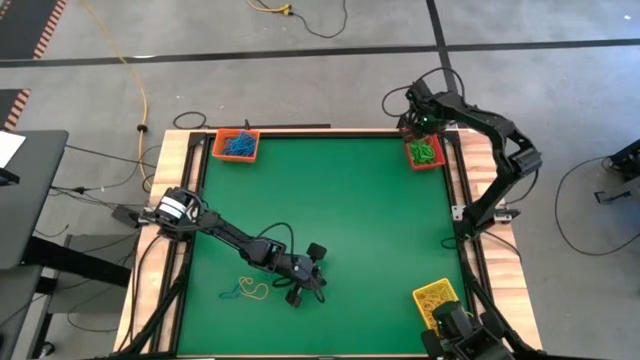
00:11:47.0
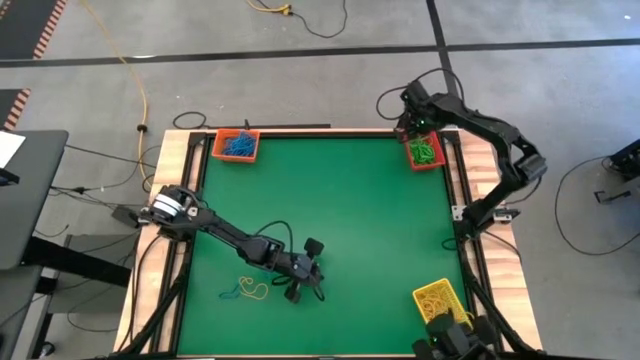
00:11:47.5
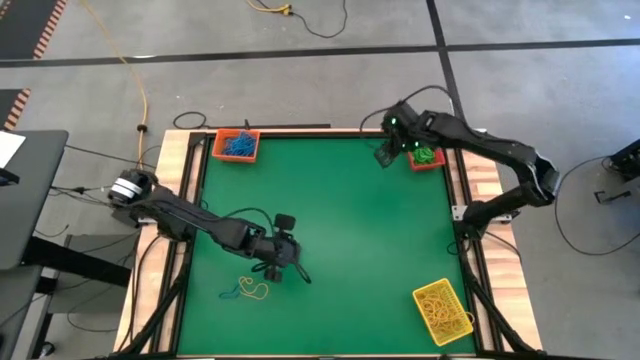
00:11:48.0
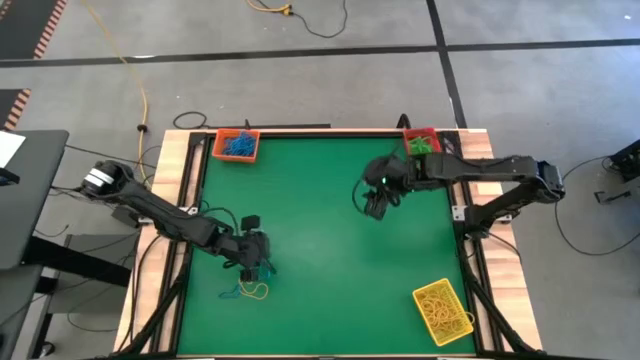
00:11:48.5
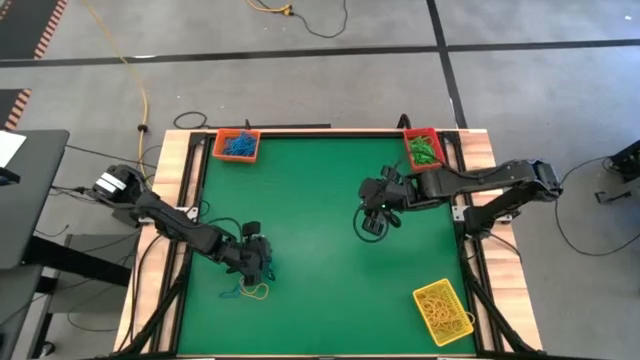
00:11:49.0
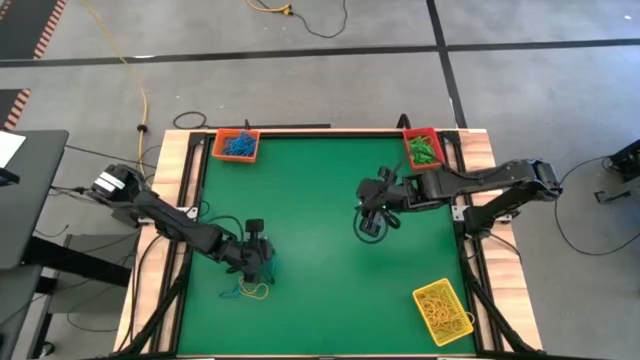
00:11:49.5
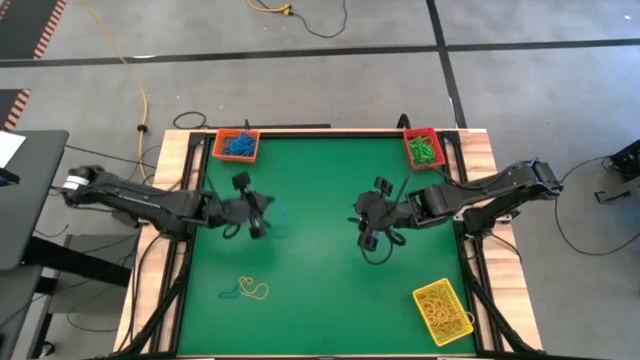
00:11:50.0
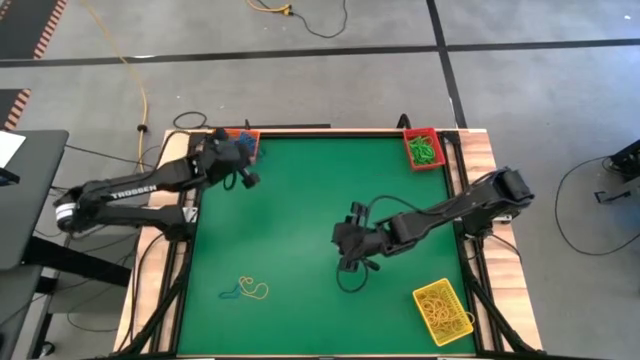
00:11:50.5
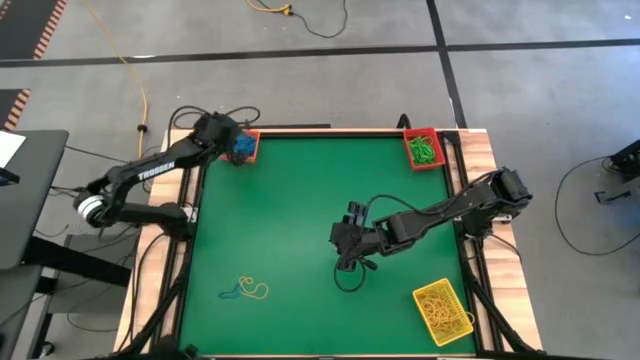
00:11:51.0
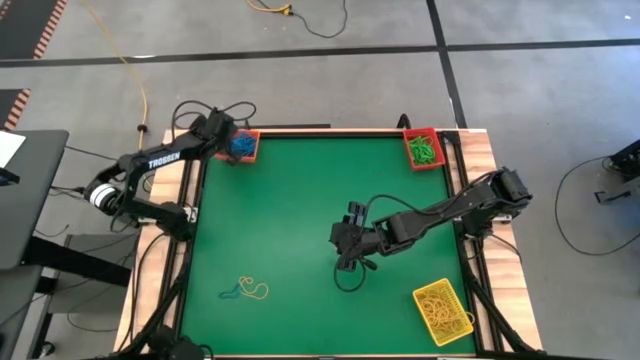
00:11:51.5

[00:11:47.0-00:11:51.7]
Task: Sort rubber bands into baskets
Put the left blue rubber band into the orange bin

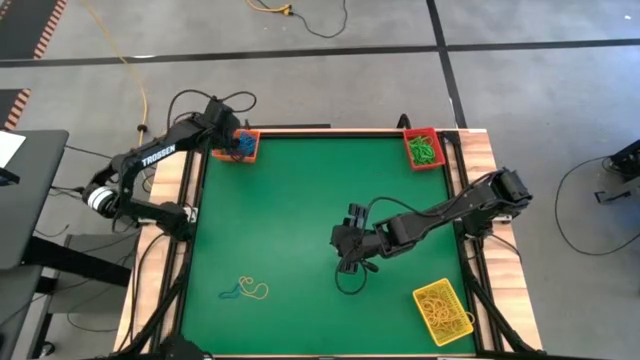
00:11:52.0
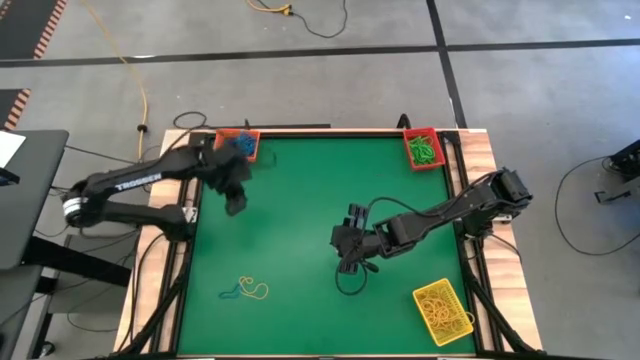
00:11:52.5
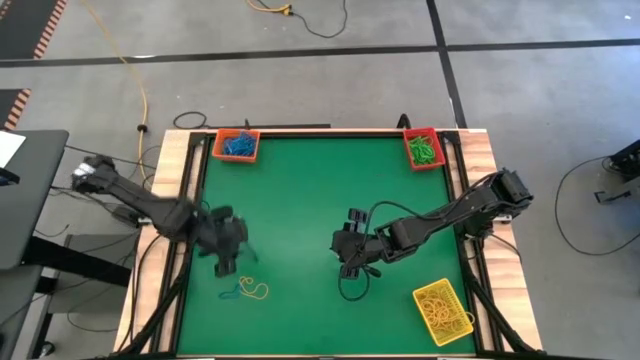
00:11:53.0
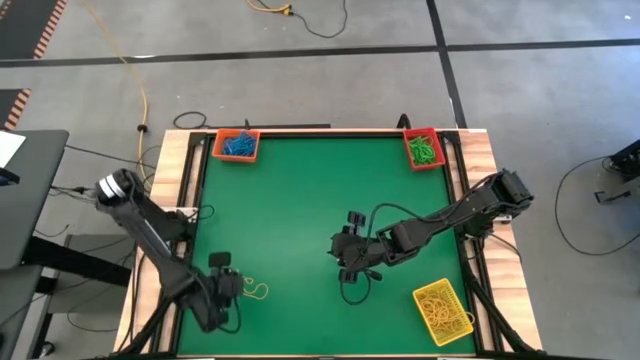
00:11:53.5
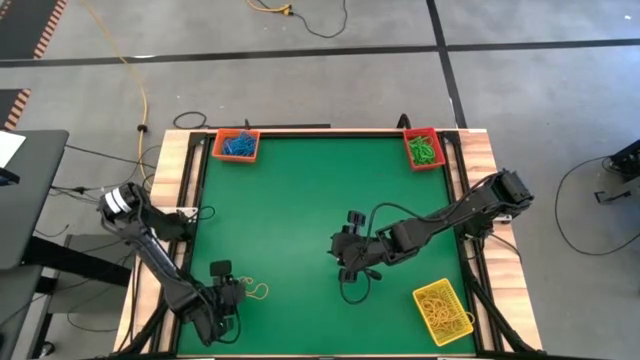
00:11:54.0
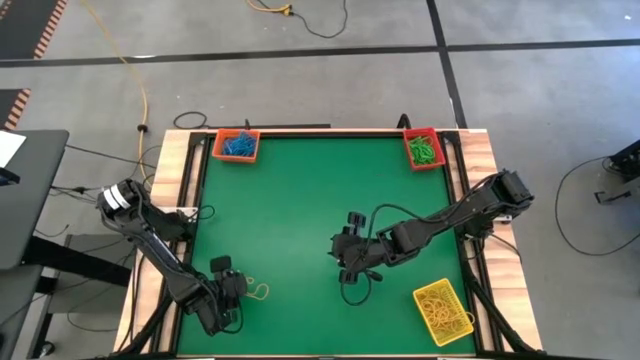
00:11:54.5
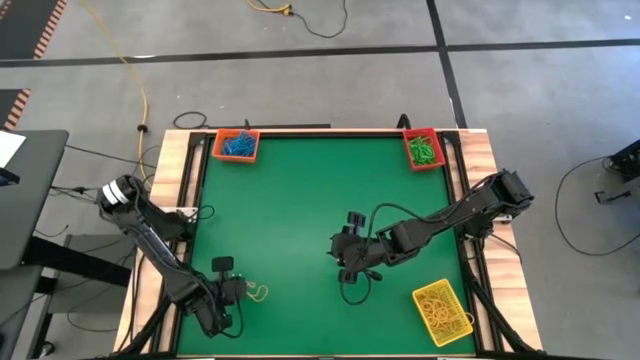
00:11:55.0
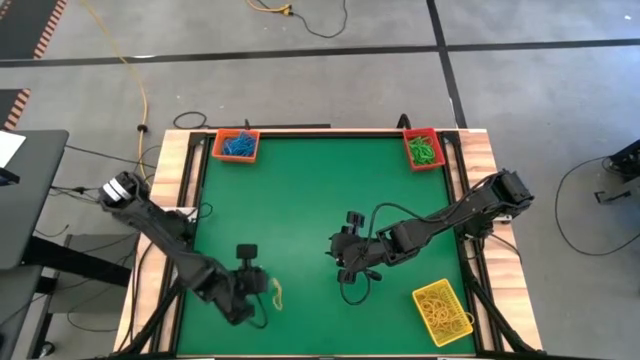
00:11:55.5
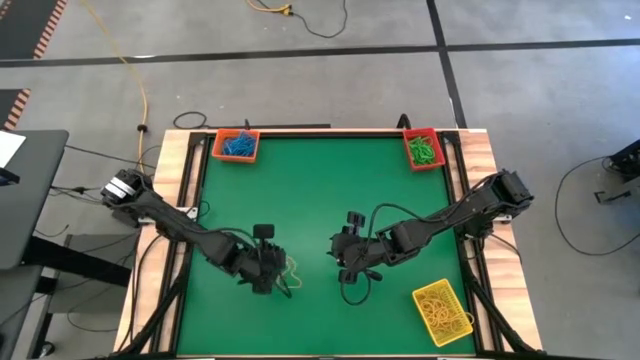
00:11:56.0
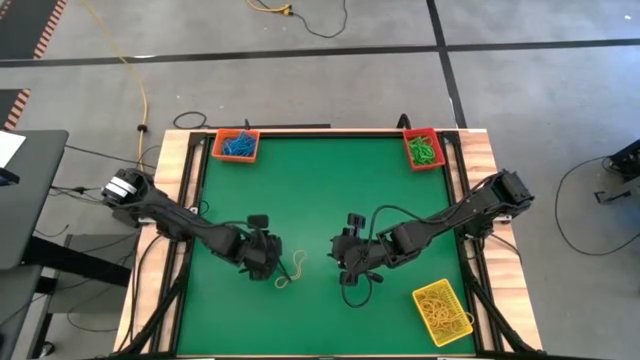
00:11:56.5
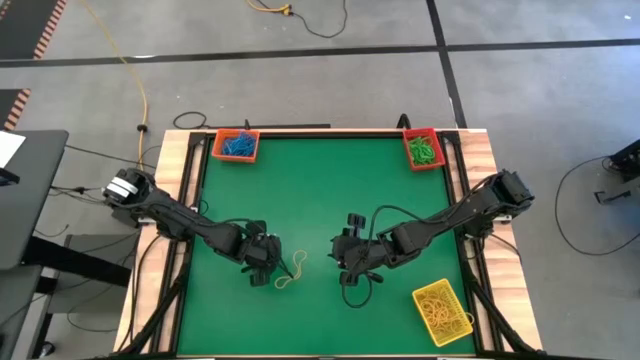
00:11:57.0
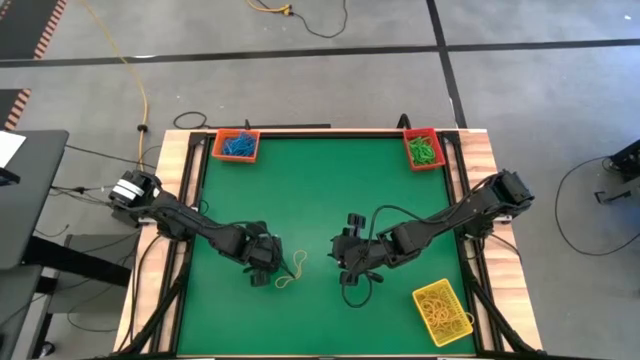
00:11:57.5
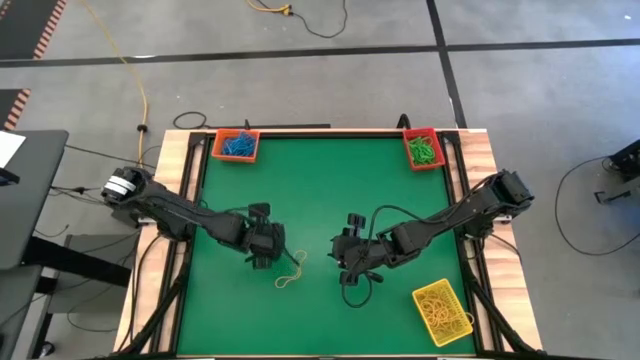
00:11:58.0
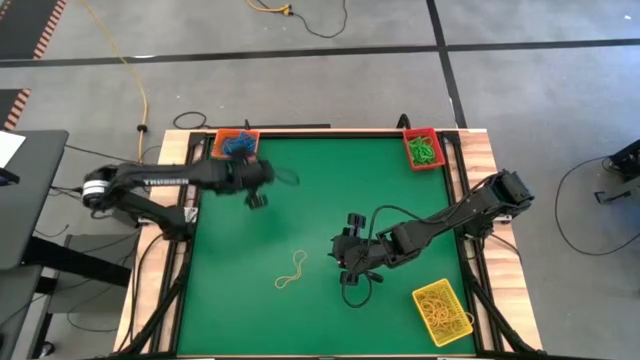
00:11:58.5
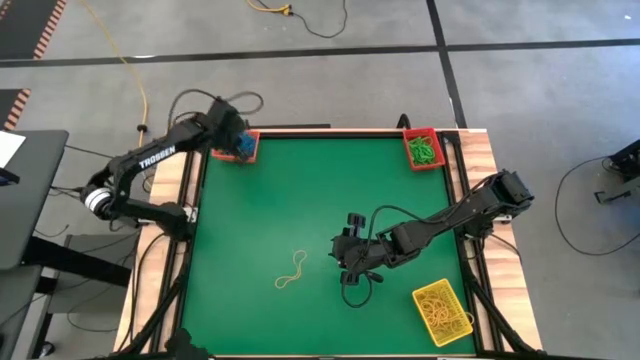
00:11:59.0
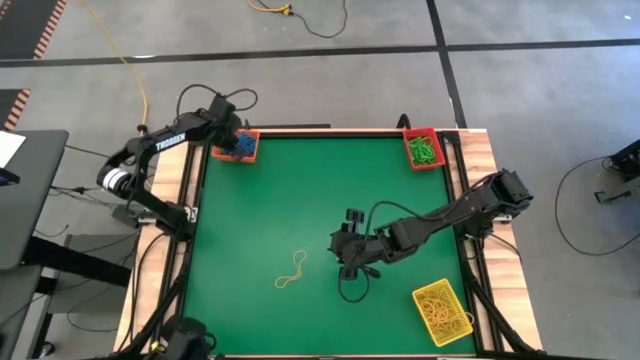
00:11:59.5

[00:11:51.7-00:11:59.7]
Put the blue rubber band into the orange bin

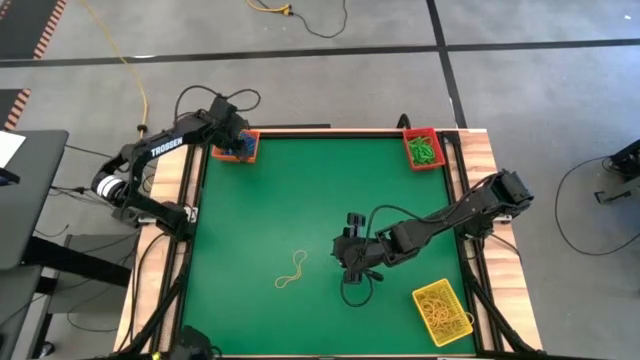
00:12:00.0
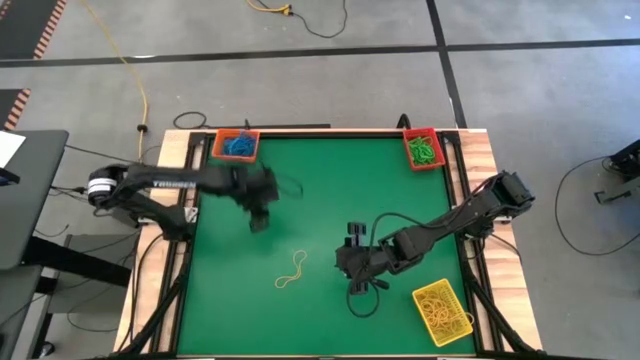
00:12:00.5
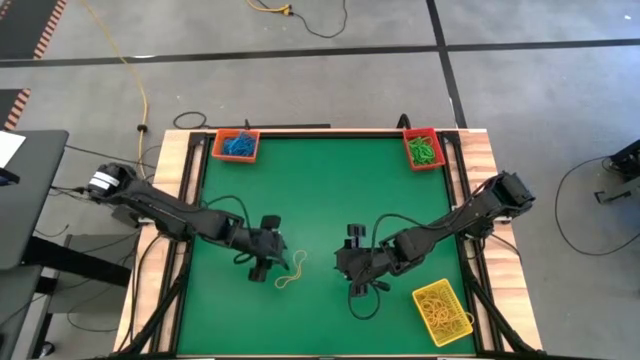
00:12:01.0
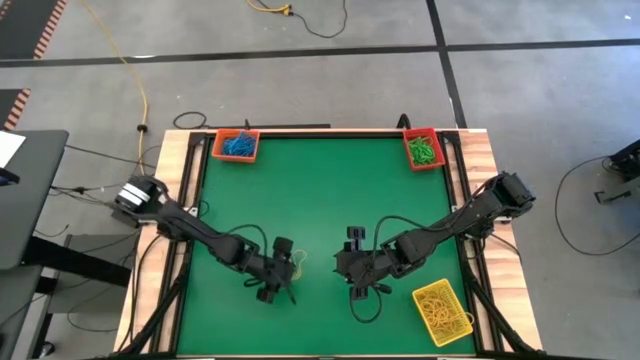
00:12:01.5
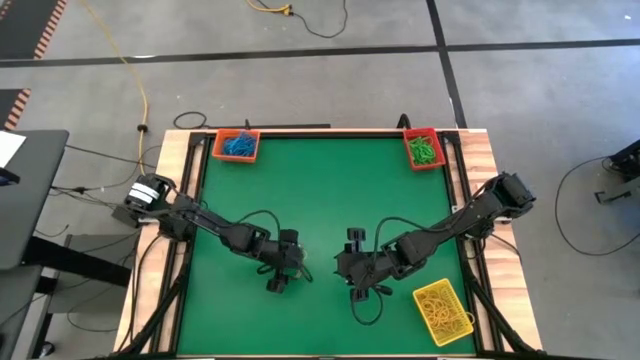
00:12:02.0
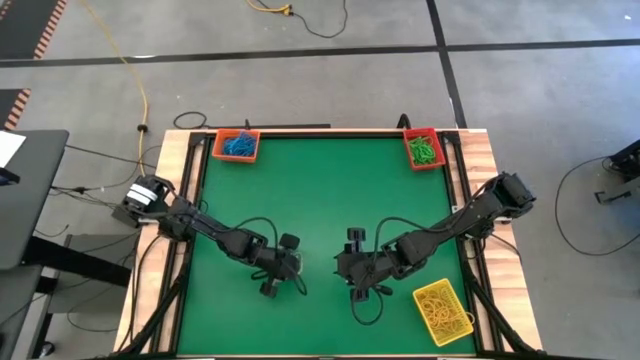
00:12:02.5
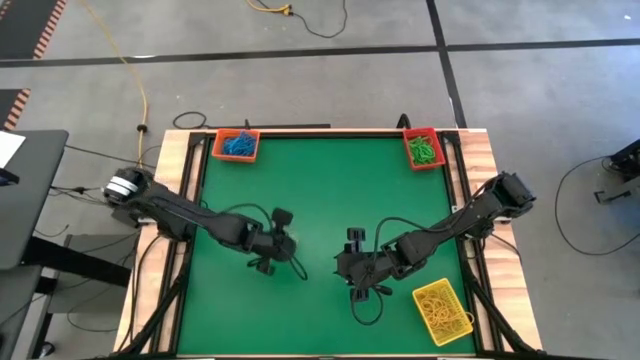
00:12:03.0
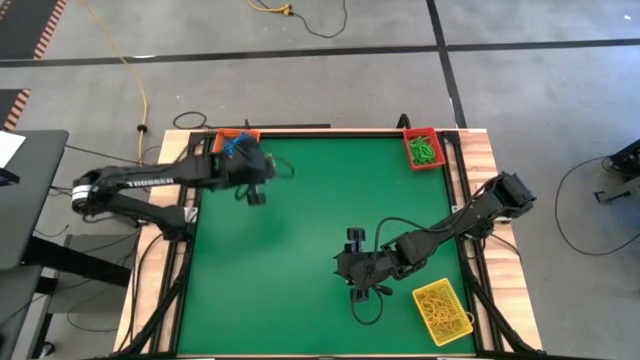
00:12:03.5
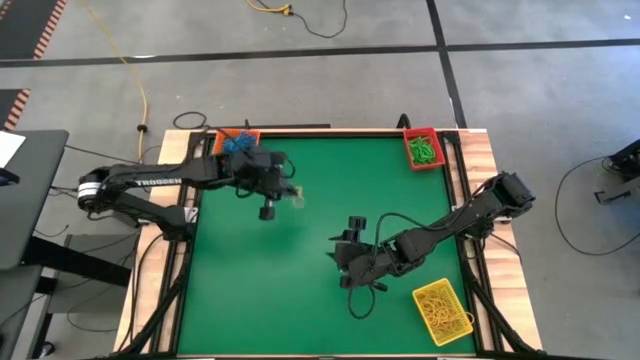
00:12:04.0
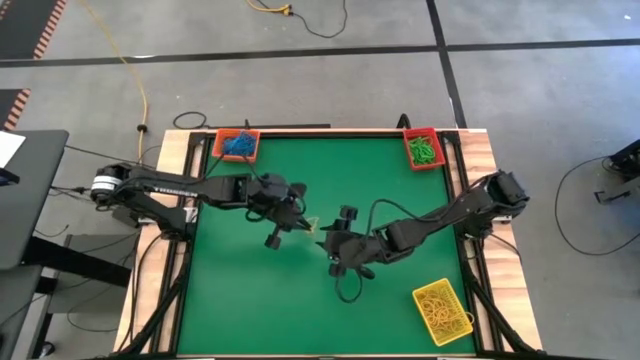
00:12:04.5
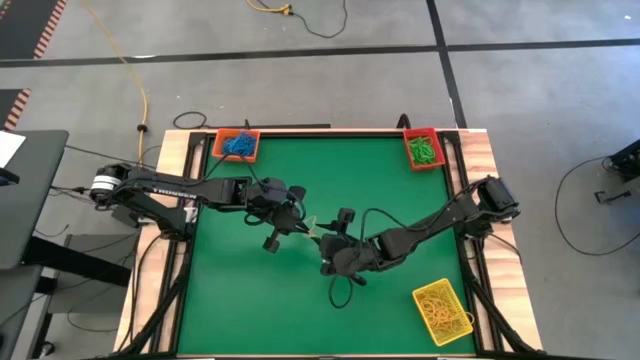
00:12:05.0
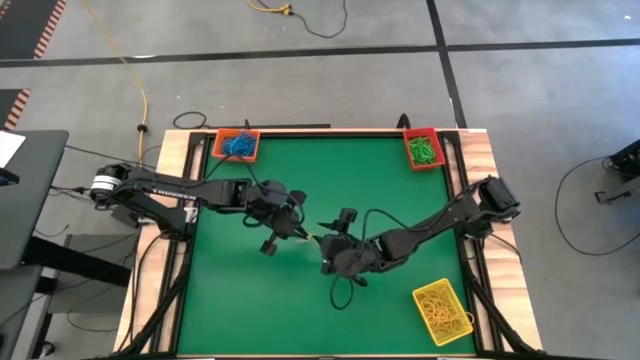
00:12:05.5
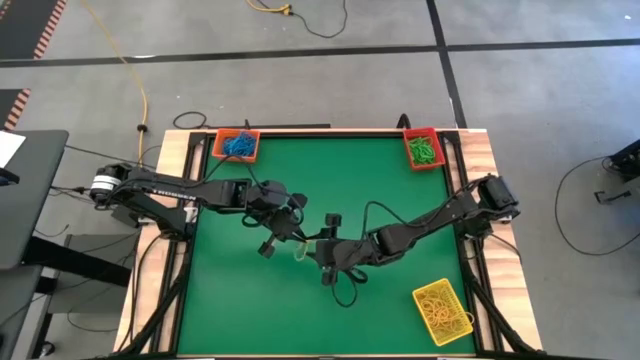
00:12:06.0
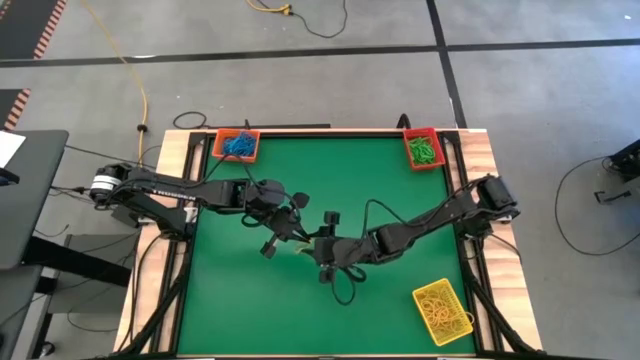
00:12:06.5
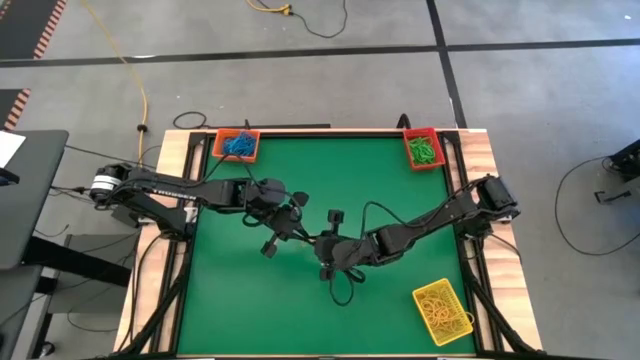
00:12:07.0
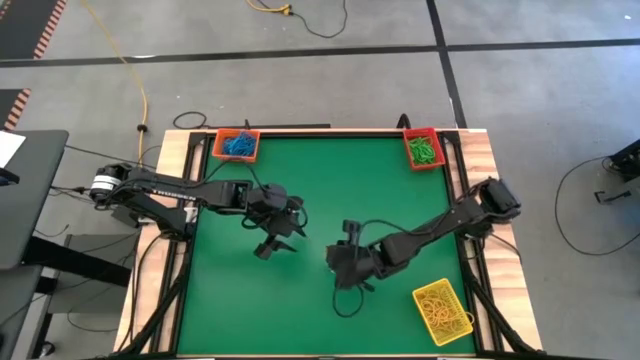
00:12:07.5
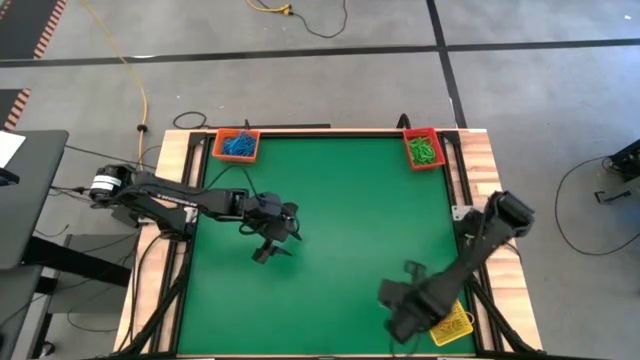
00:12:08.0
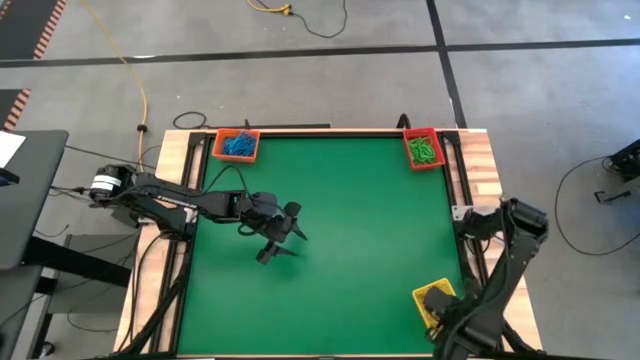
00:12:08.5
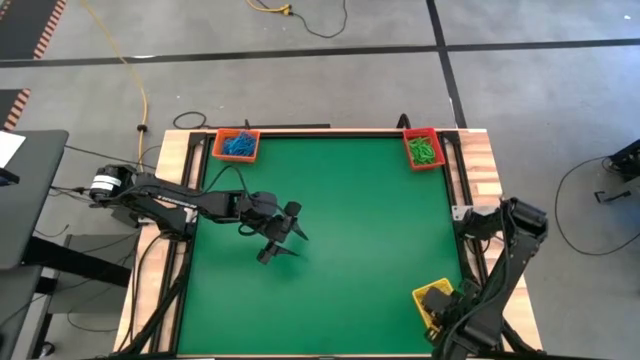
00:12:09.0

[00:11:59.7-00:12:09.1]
Put the yellow rubber band into the yellow bin
